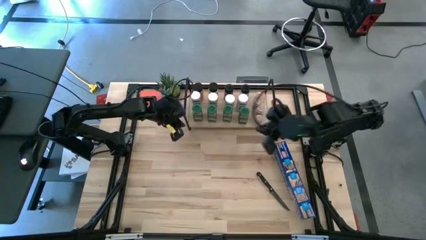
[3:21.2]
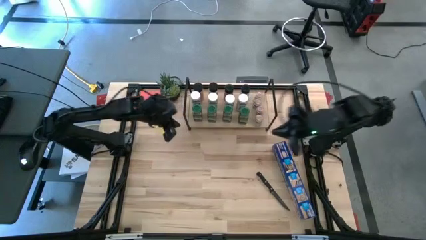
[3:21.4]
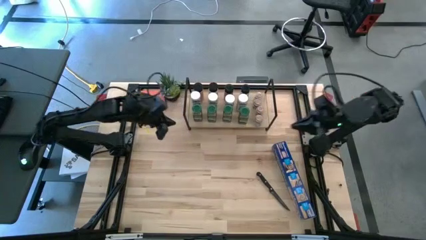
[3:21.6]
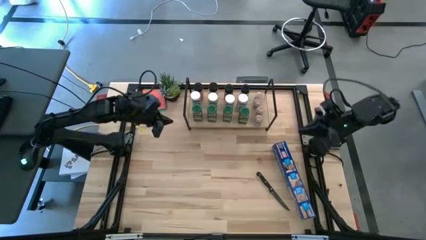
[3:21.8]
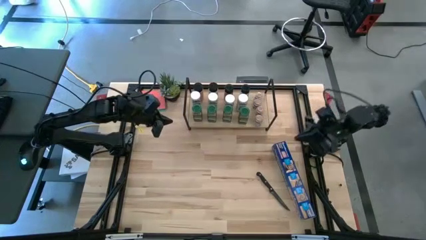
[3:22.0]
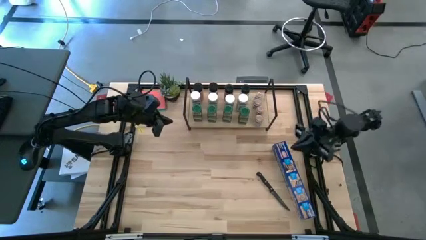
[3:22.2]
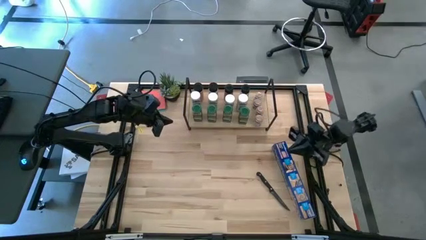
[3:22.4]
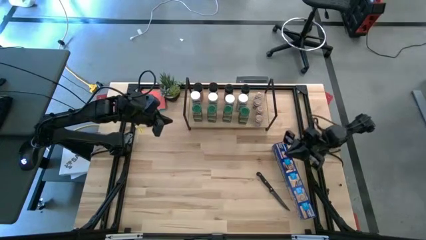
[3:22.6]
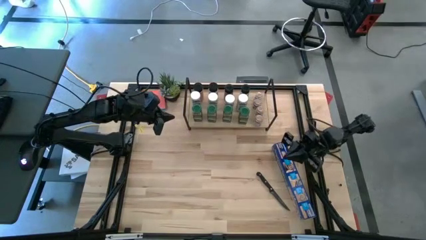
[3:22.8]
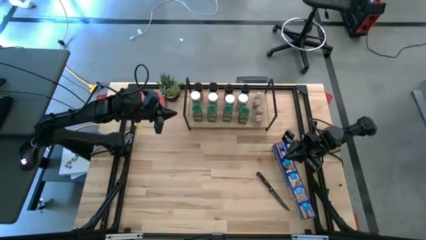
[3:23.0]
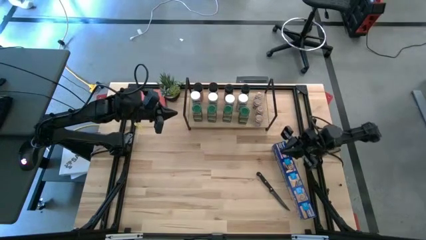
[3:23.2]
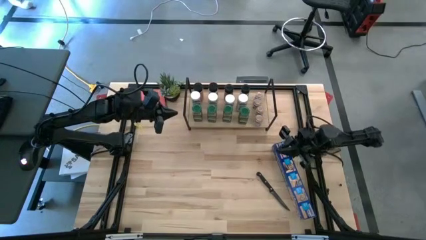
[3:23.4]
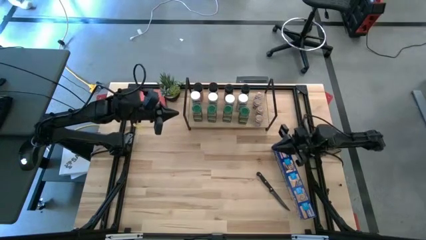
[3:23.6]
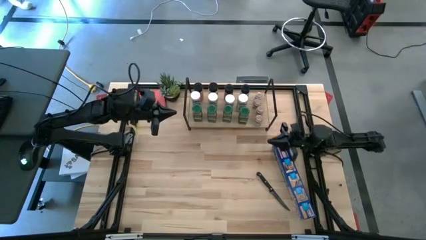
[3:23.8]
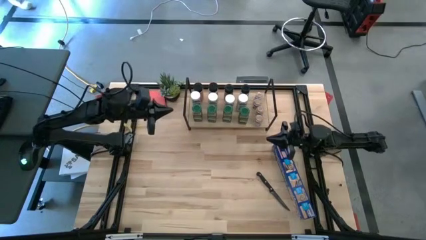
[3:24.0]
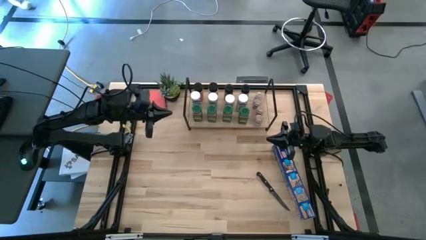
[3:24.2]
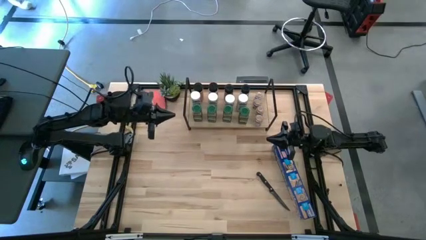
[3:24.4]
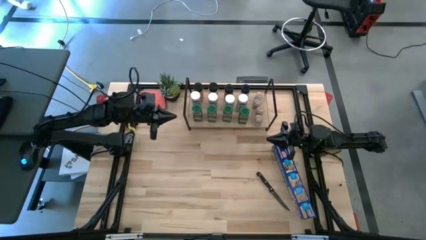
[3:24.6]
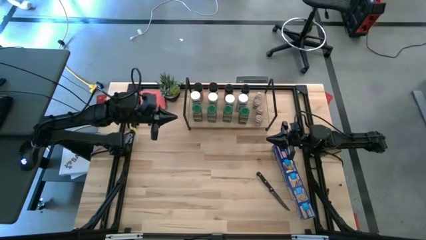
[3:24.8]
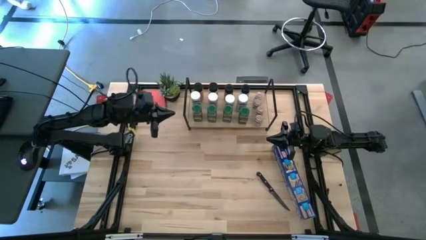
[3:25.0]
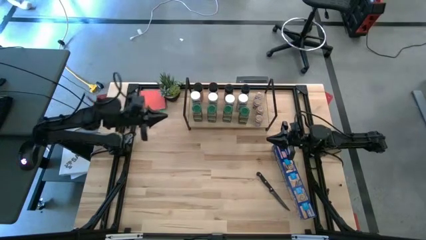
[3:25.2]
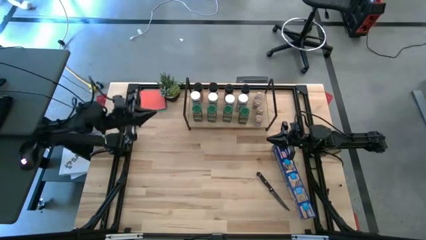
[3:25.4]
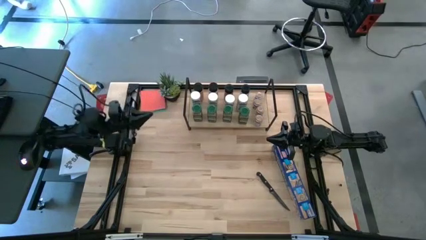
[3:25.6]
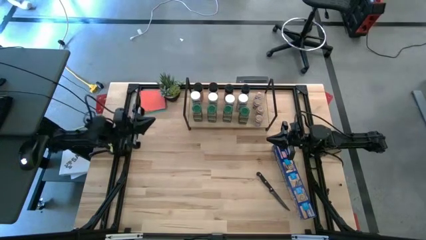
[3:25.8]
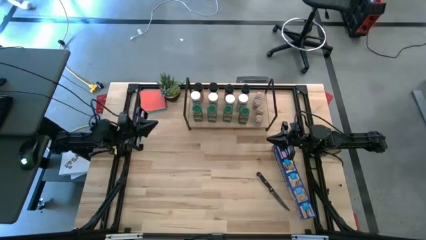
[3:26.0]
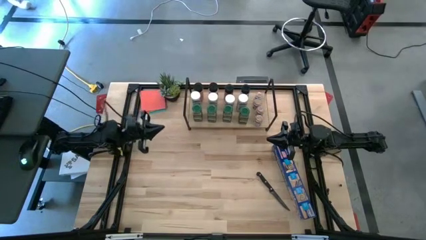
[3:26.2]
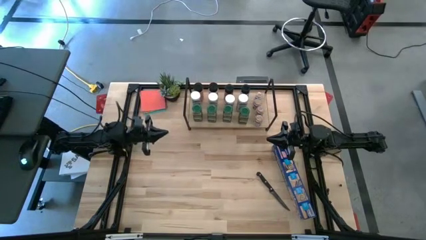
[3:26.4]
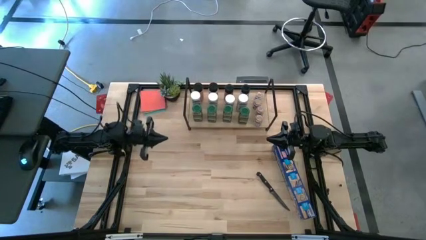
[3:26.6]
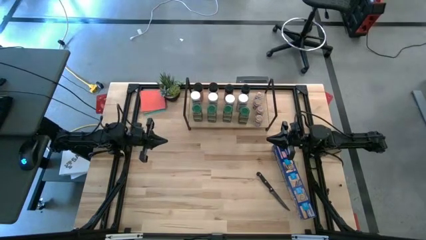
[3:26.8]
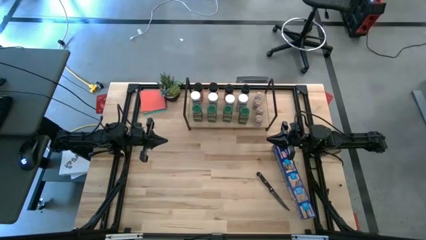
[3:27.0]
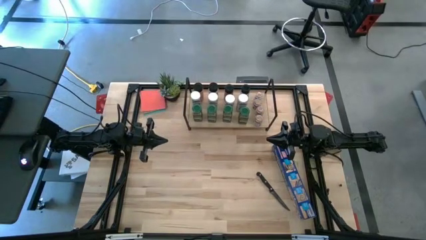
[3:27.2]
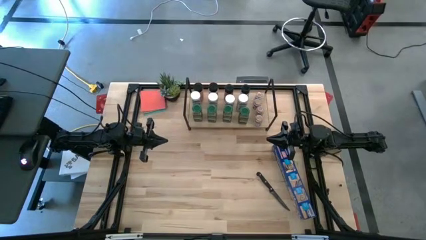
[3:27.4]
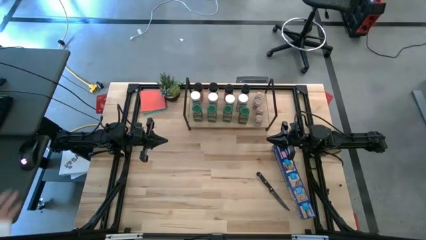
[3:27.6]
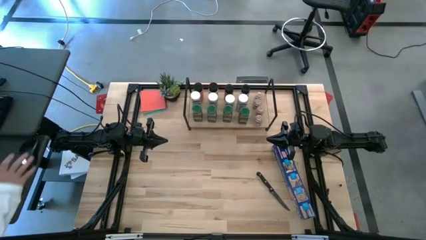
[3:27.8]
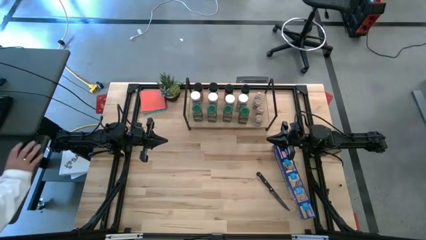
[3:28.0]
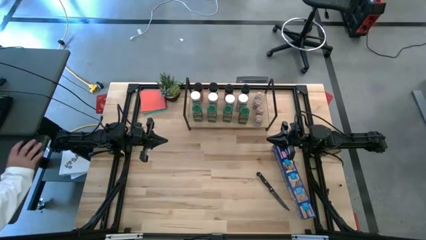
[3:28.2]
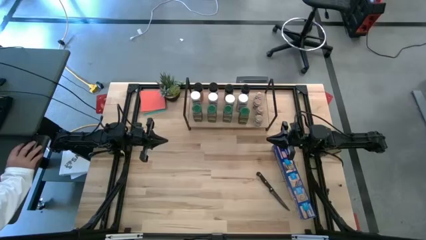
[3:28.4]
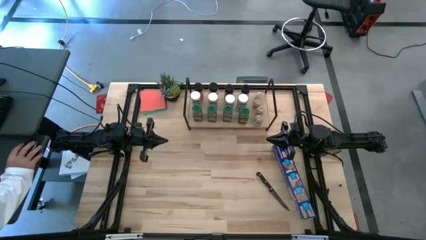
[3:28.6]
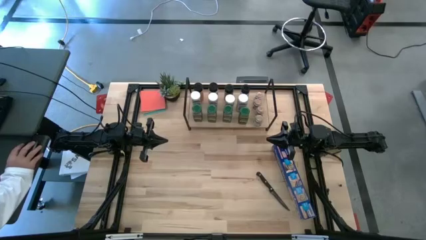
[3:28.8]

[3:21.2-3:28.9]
Task: Shelf spices
Return to Home Position

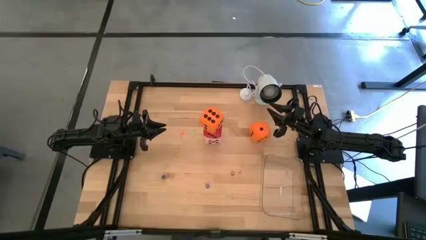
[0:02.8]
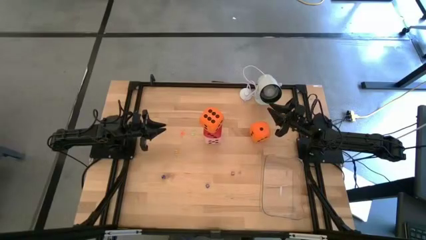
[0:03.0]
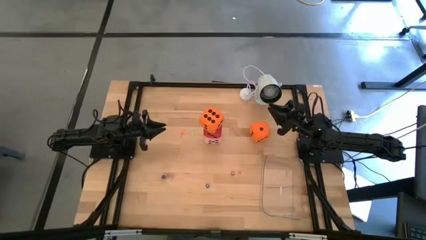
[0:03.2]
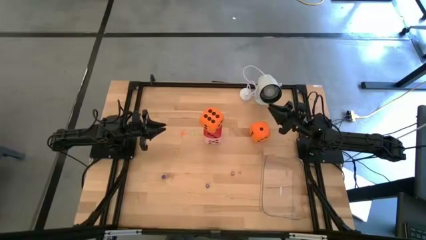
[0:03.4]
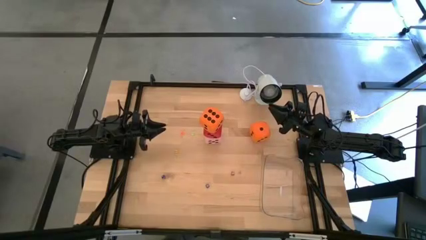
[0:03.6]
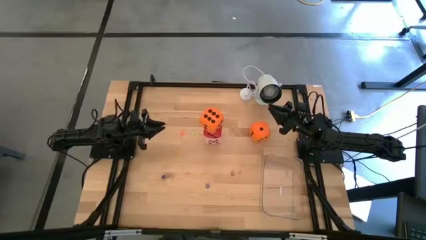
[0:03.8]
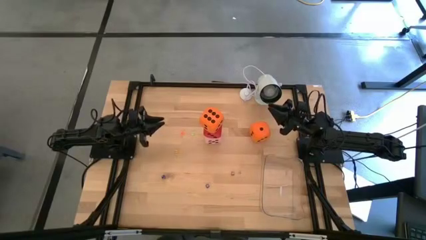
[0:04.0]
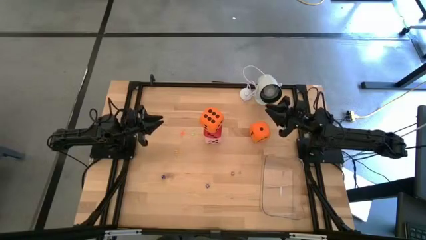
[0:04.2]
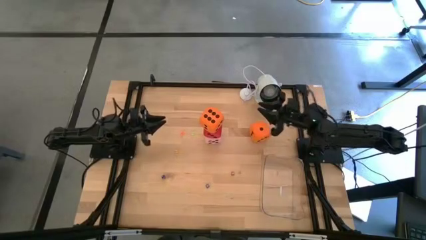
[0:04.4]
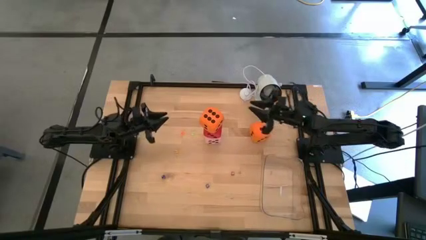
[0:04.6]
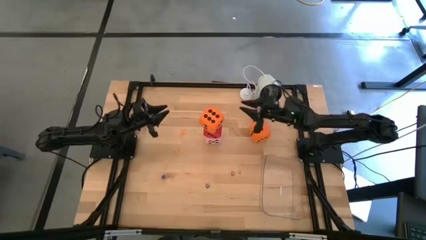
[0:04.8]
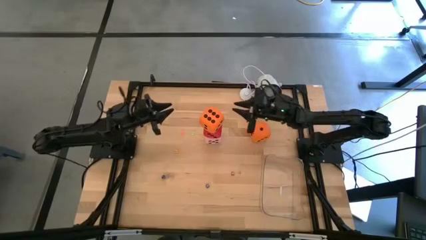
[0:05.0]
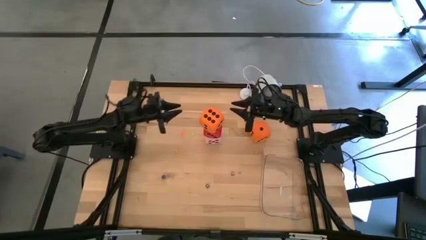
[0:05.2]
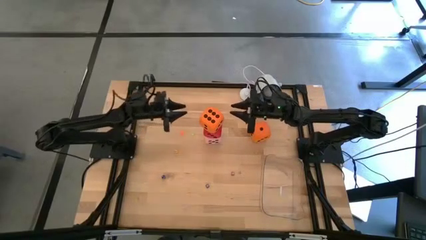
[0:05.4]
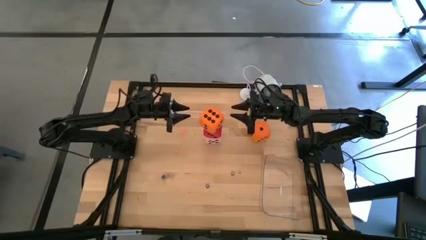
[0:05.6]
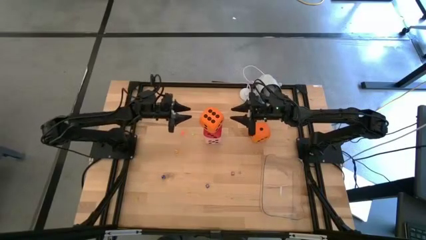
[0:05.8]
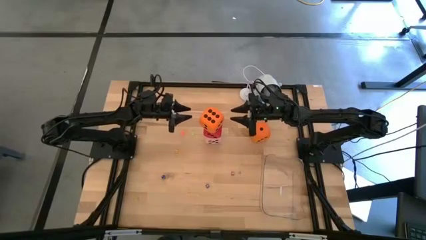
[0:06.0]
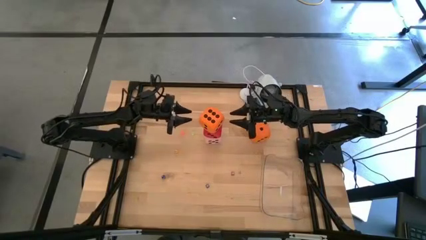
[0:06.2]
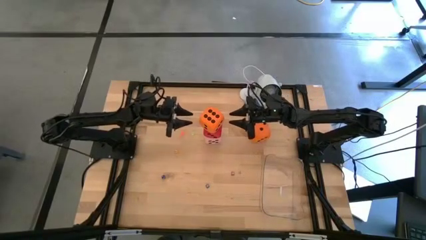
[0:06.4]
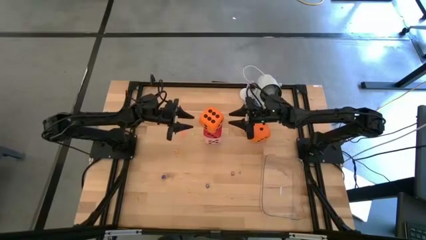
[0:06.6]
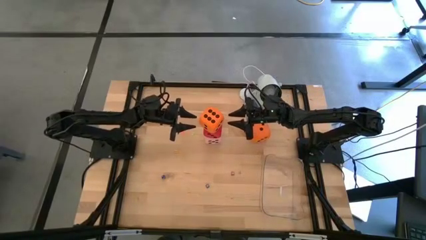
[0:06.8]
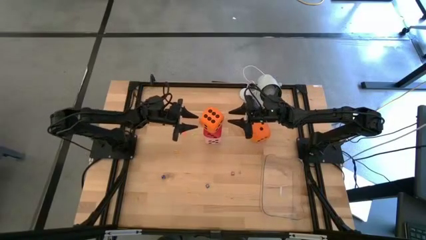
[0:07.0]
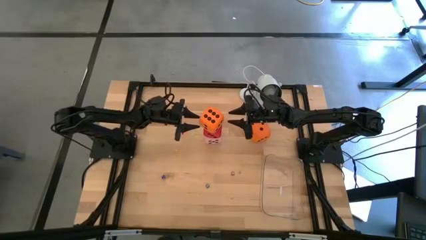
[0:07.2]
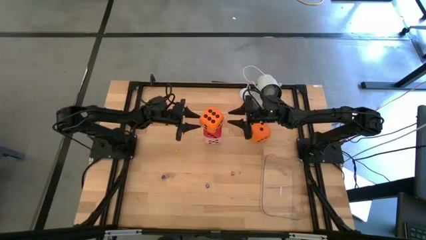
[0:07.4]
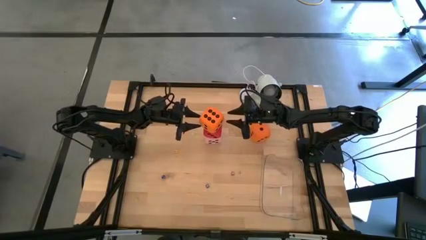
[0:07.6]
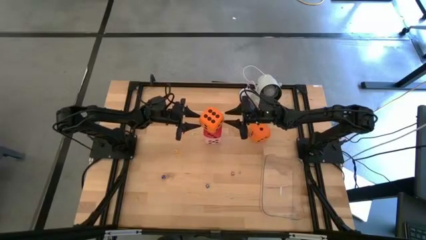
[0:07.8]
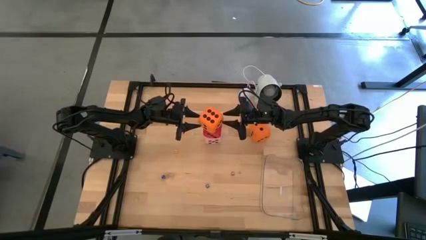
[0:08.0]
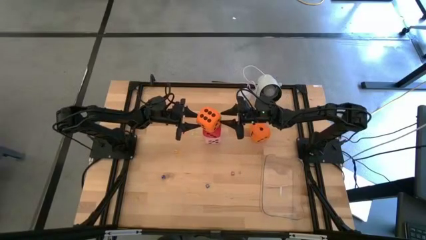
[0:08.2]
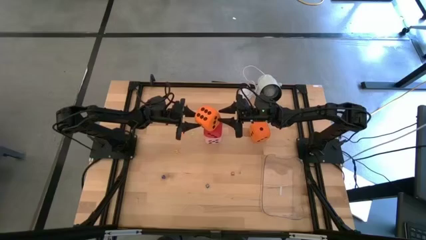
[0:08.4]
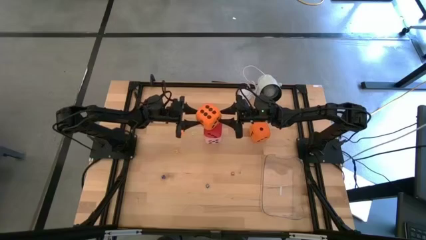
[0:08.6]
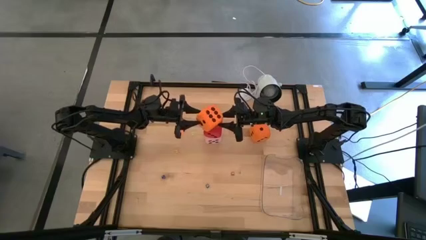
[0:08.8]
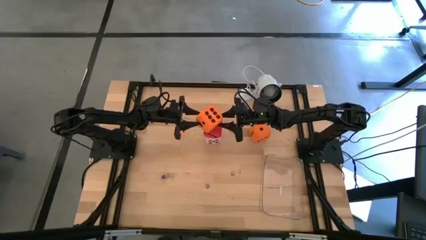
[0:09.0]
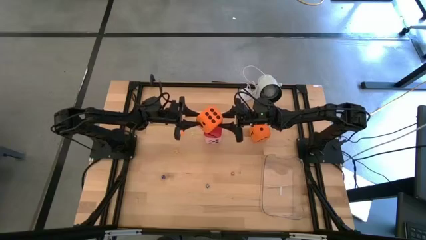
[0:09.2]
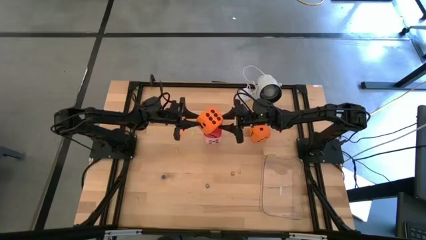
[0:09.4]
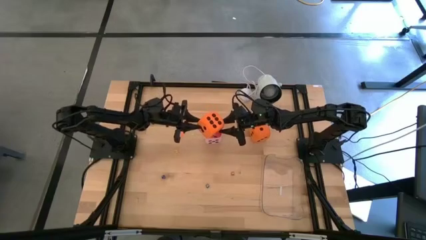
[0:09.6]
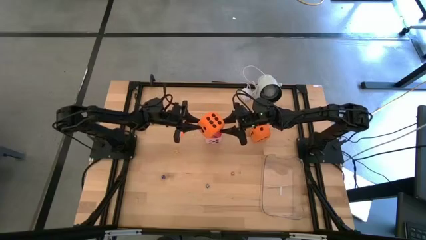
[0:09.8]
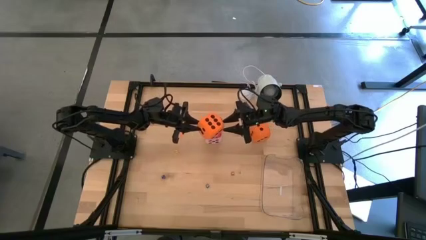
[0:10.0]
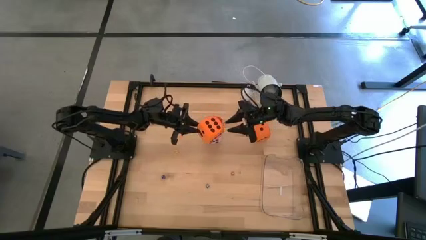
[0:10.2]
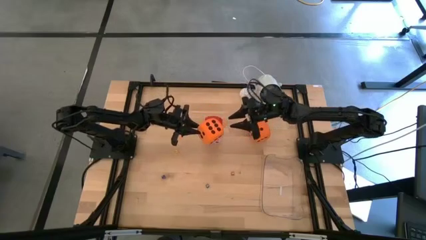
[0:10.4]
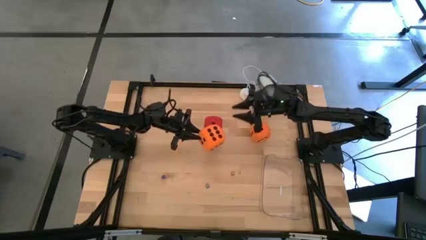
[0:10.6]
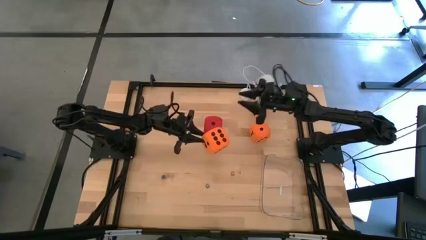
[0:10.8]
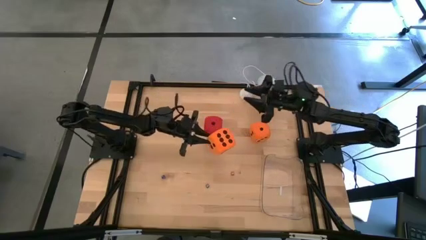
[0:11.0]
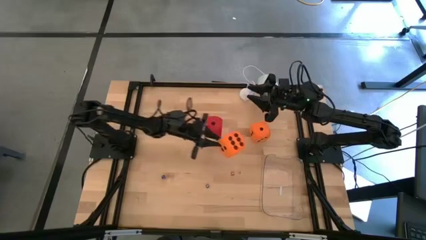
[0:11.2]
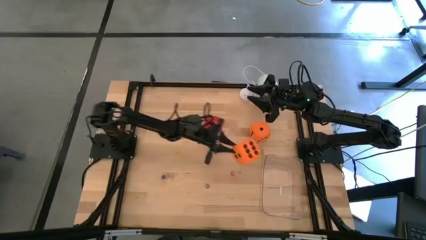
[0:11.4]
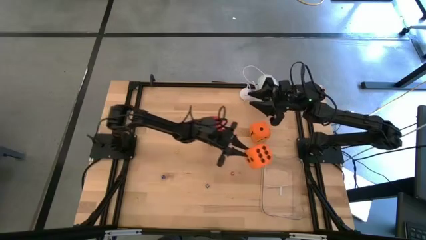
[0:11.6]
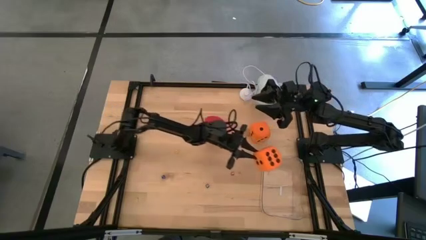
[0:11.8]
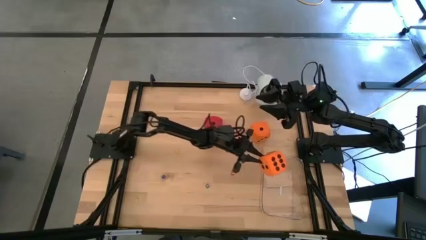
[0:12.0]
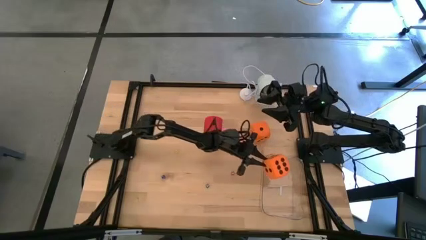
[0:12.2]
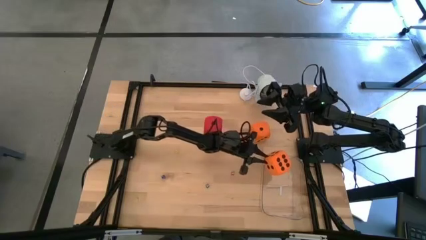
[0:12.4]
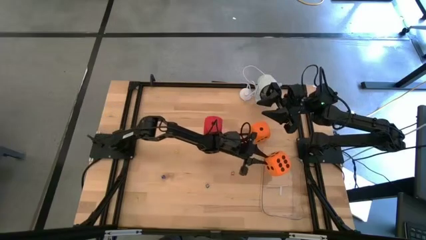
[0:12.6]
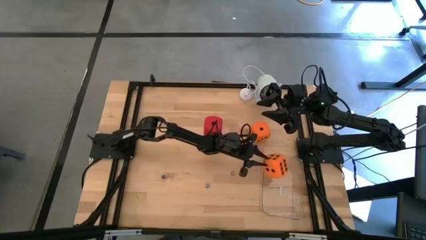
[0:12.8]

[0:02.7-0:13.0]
Task: Pick & Place Dice
Put the left large orange die into the transparent container
